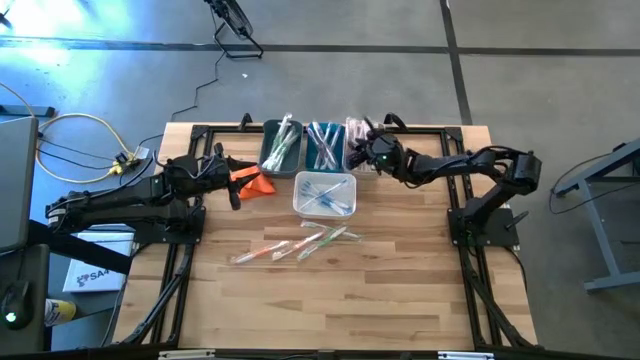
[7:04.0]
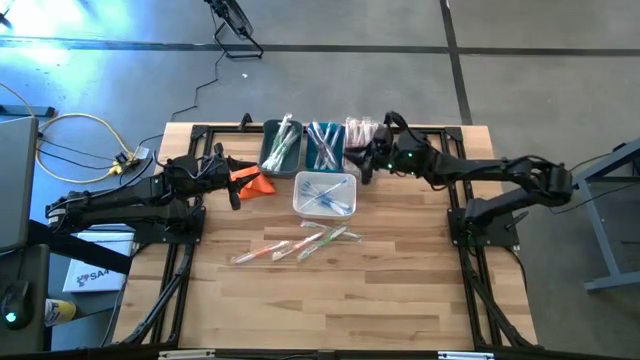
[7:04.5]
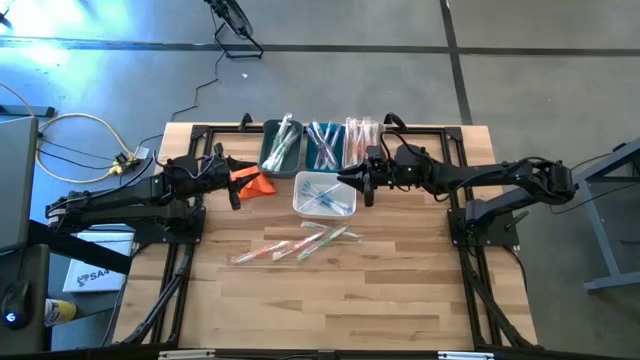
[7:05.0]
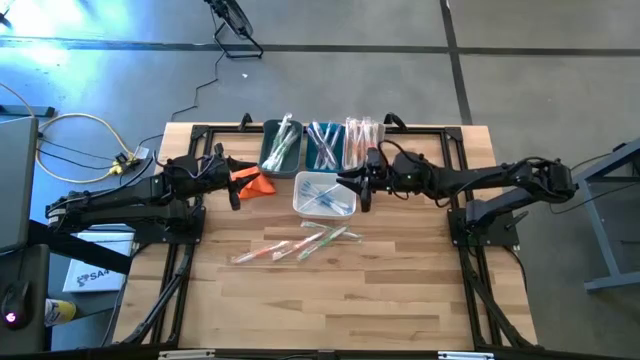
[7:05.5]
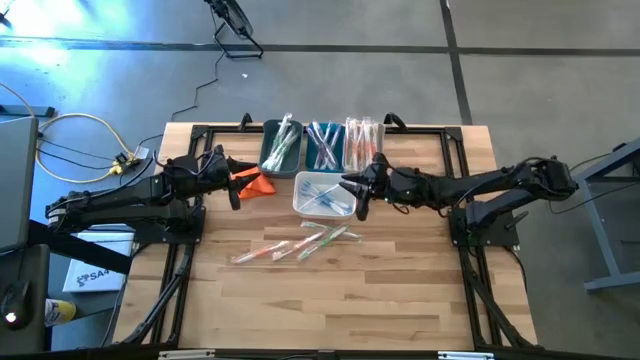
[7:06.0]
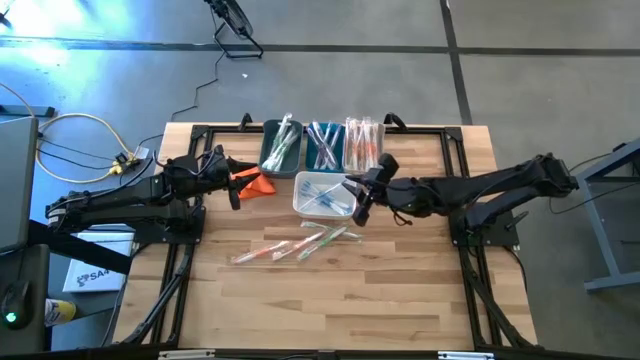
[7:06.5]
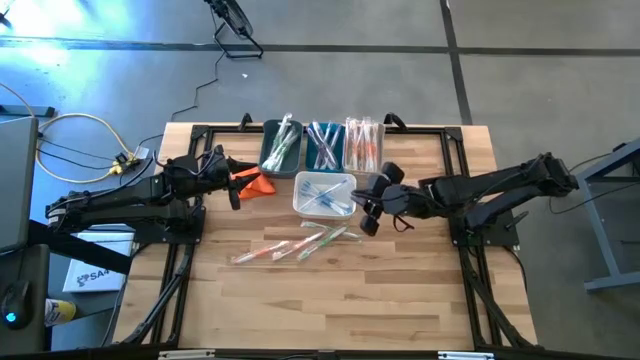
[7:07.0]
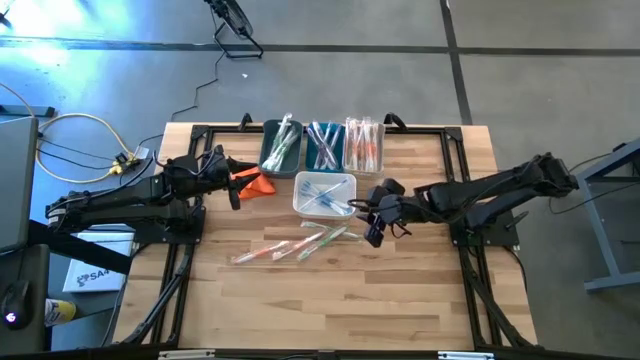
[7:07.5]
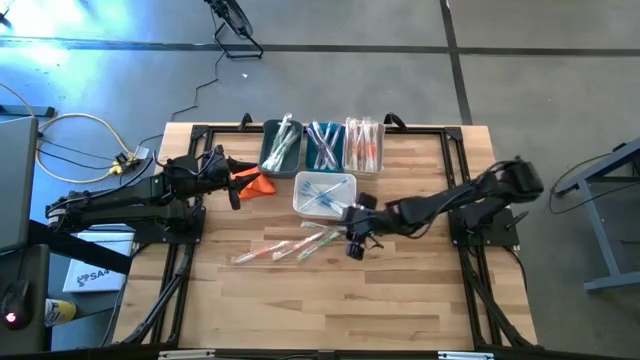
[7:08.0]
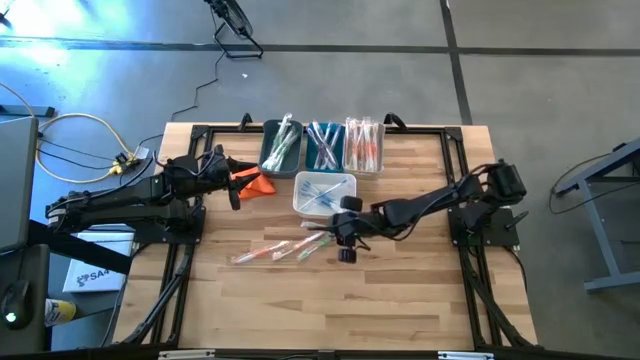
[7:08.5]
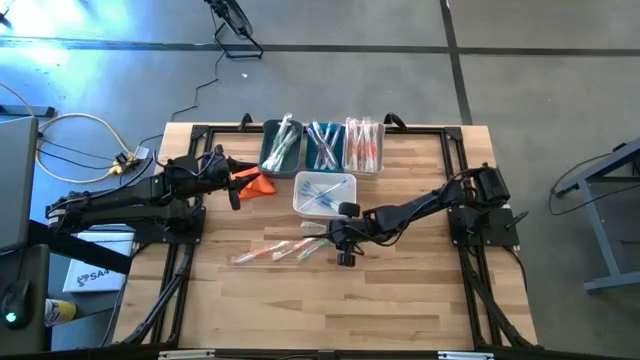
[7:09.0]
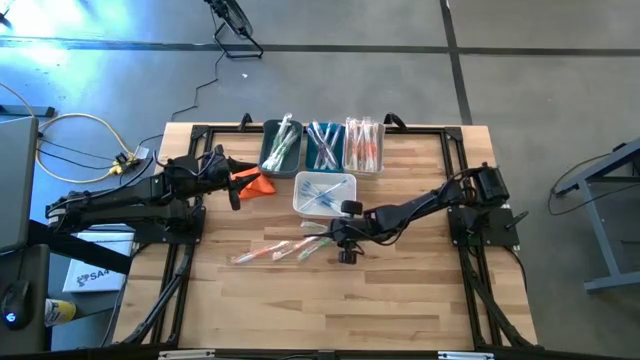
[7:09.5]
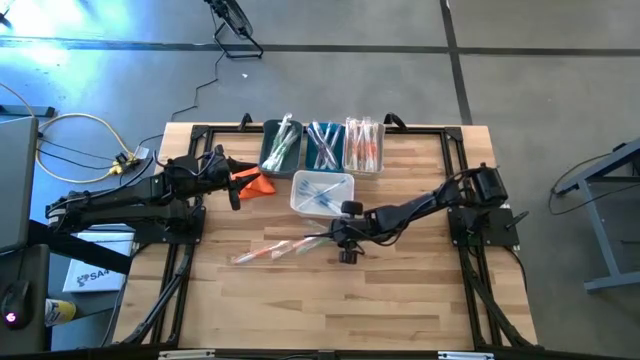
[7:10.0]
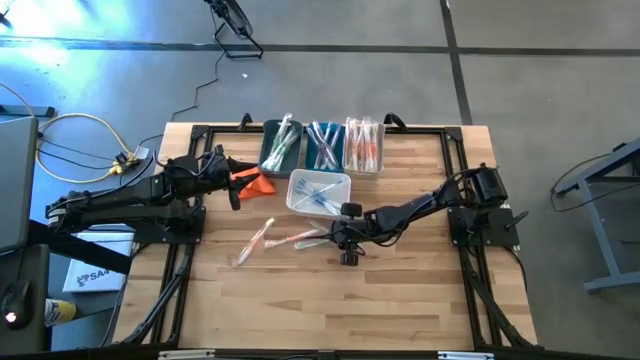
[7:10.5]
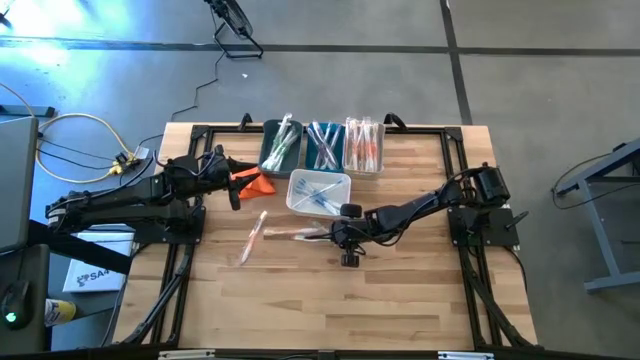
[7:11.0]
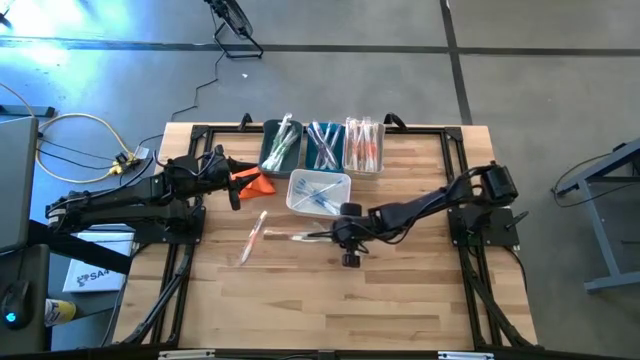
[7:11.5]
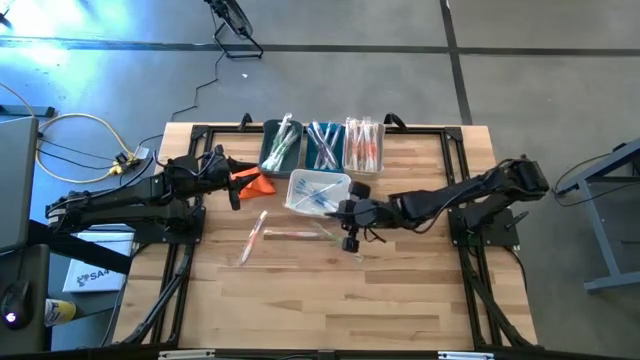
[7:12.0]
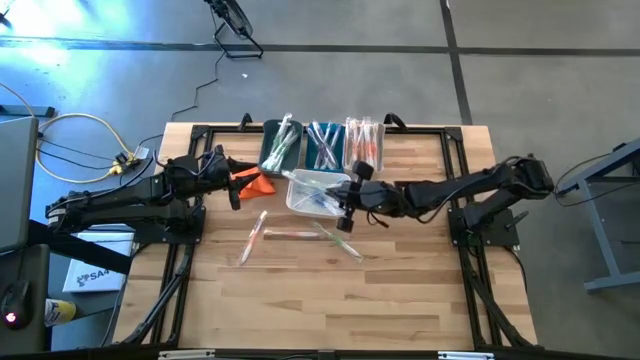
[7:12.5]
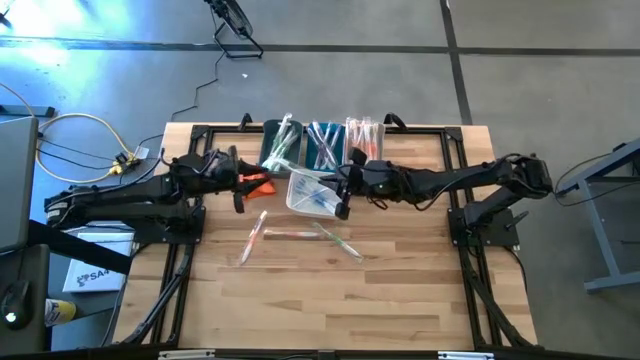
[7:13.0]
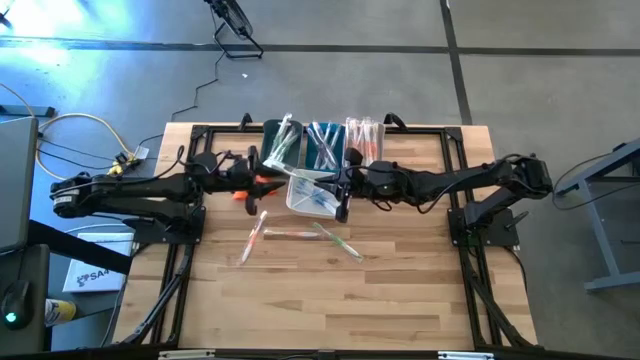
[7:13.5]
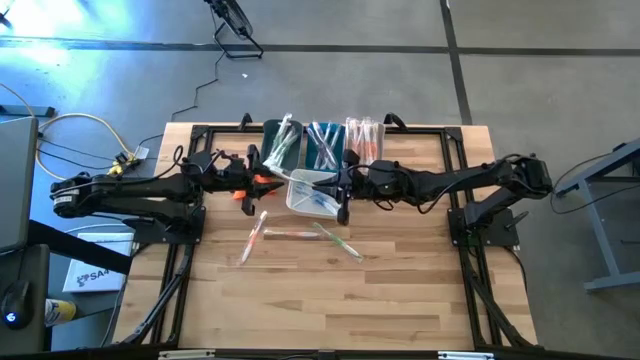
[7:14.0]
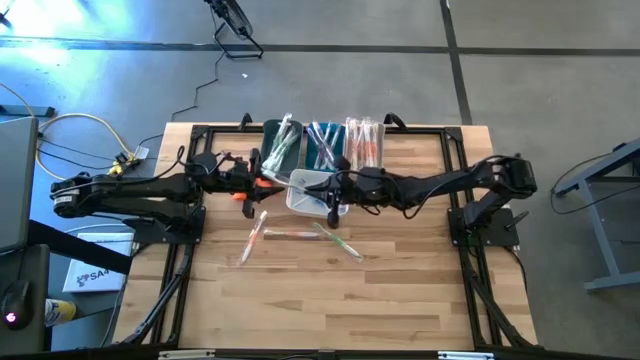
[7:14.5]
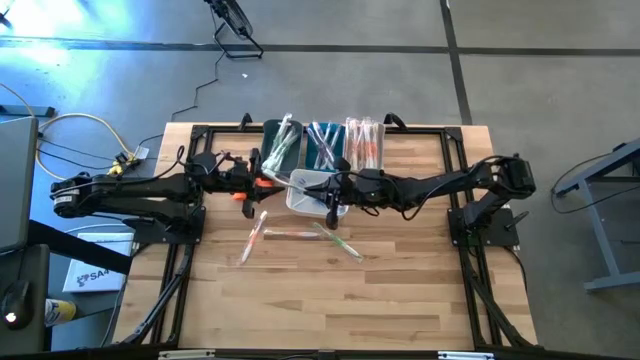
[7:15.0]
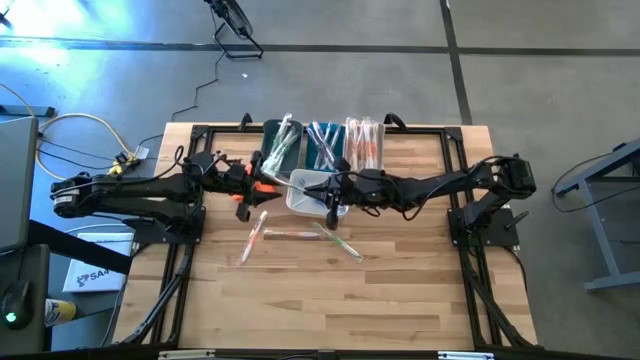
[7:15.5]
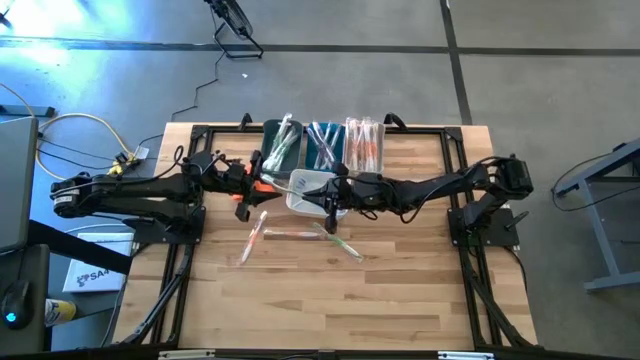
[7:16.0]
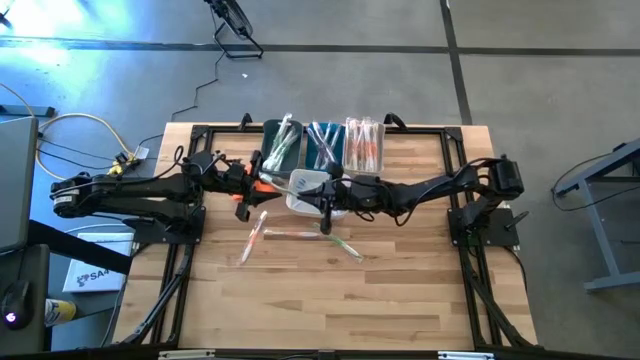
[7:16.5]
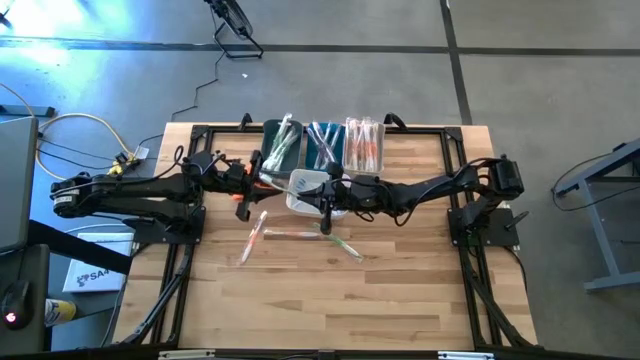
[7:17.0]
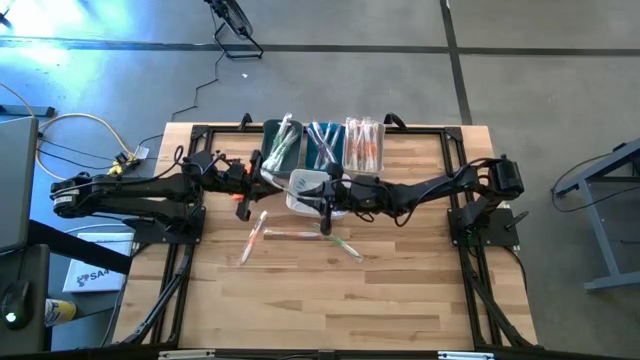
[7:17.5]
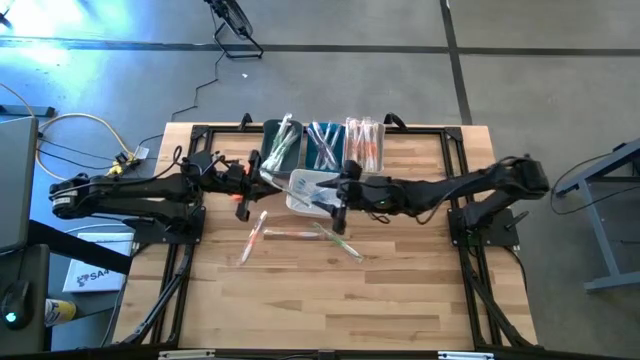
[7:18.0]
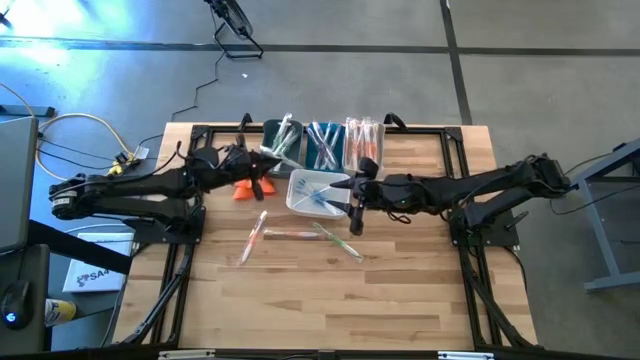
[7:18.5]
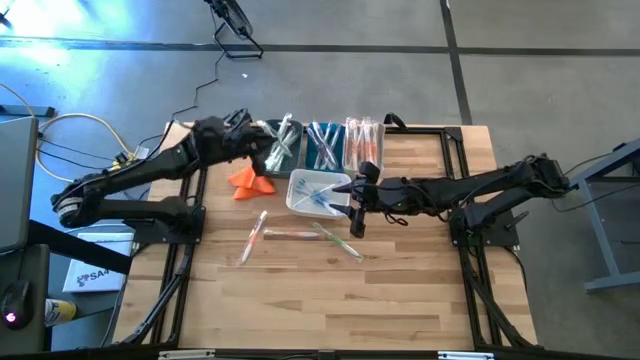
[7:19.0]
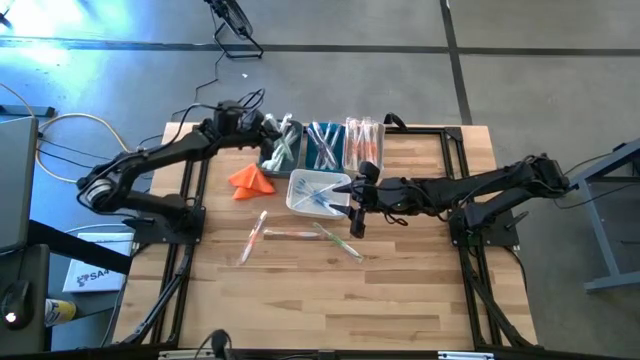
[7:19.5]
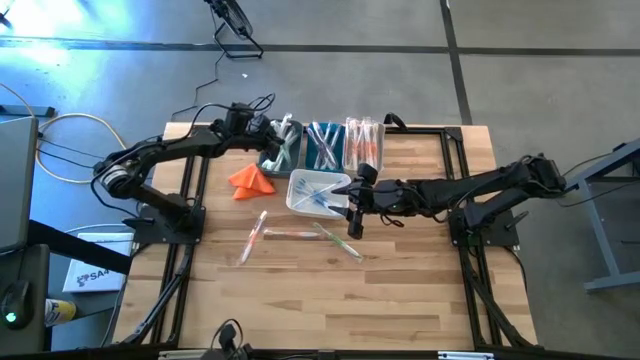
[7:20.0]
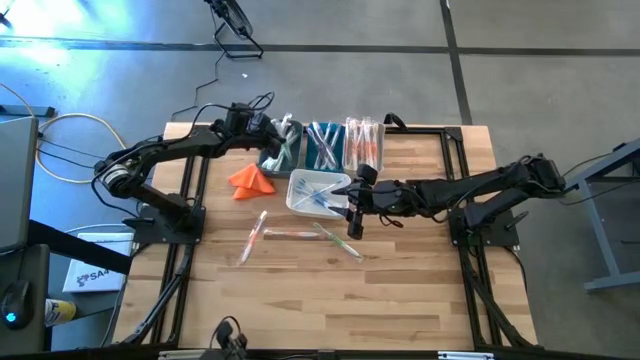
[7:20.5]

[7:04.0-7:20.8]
Task: Pick & Place Toothbrushes
Put the green toothbrush into the dark blue bin

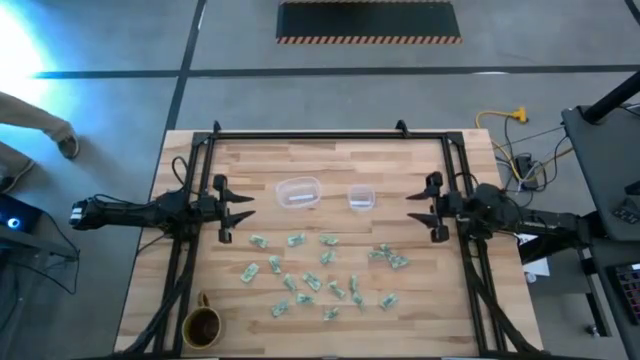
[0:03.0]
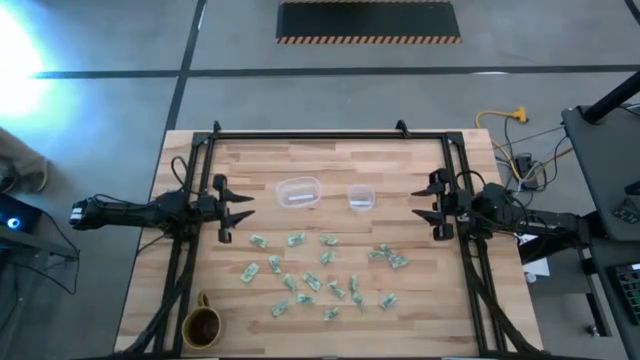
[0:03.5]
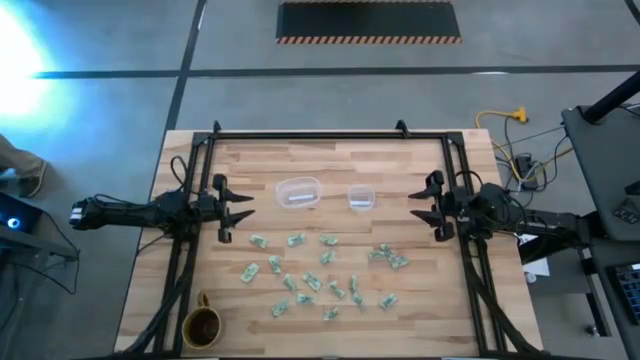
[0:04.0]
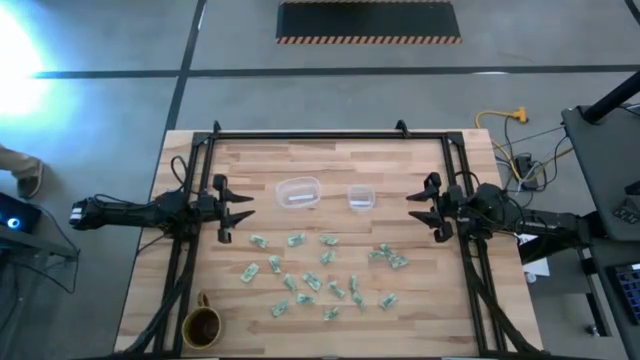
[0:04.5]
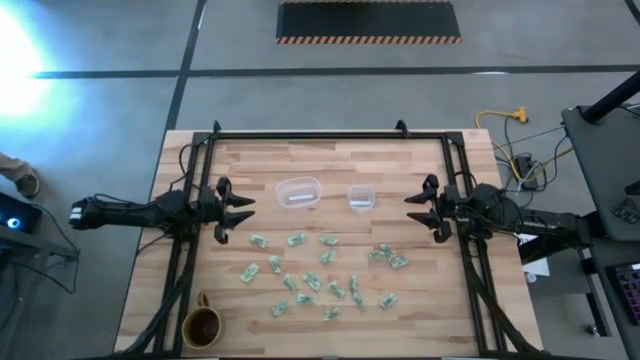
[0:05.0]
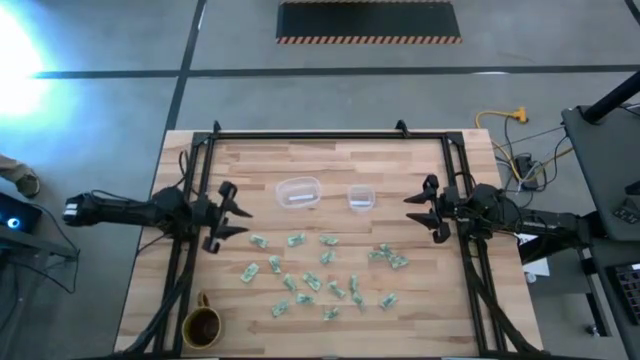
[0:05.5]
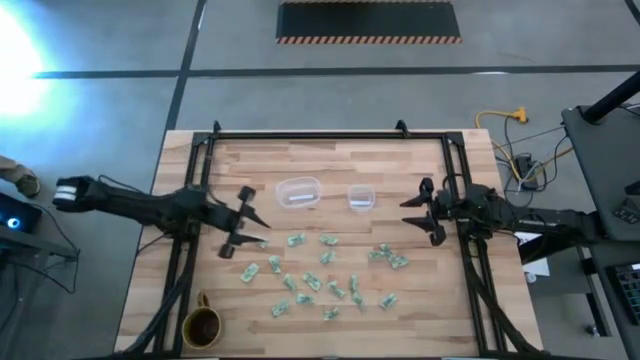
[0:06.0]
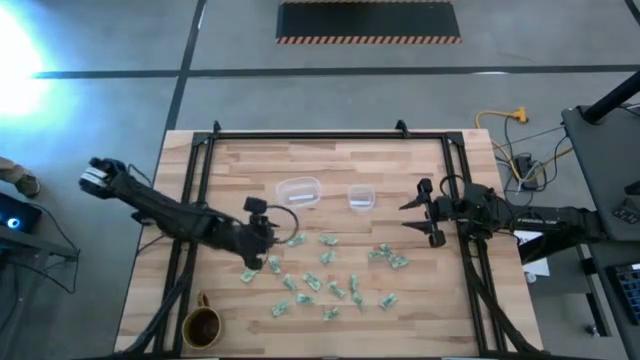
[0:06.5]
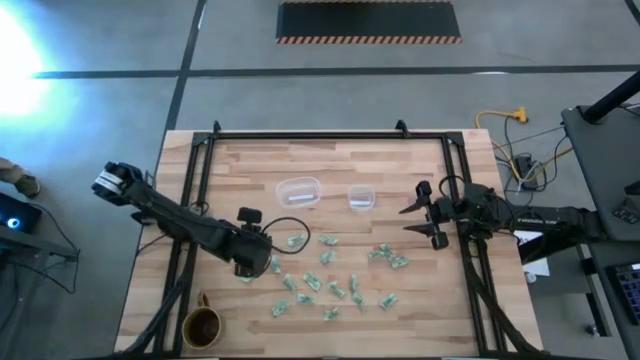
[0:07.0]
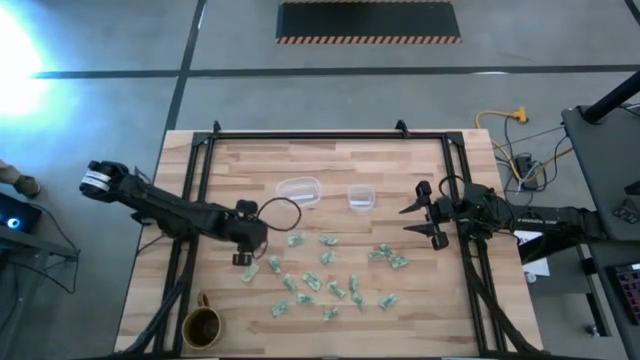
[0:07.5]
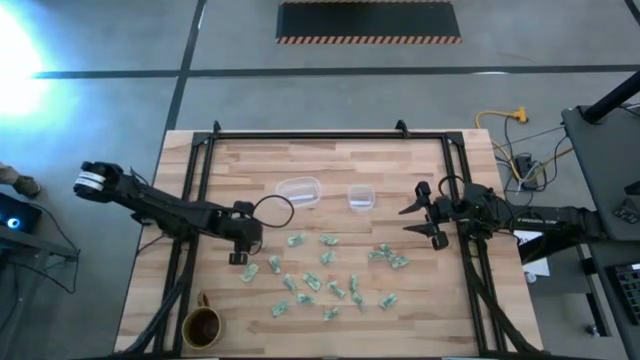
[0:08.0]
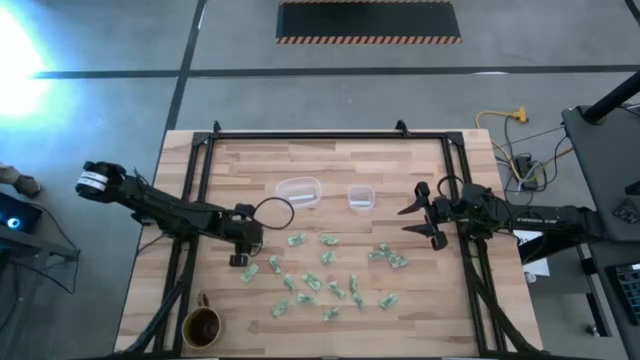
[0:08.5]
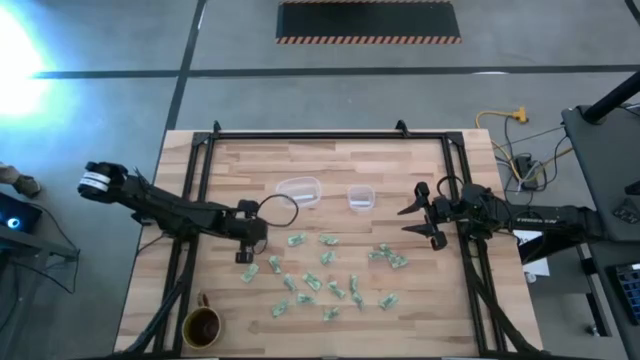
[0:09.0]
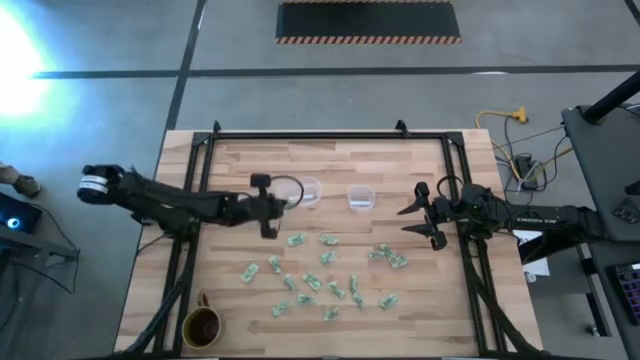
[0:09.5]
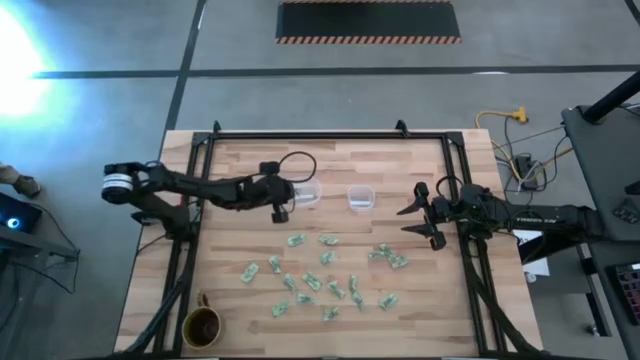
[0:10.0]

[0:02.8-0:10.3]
Task: Pick and place Stevia / Truvia into bins
Put the stevia packet into the transparent oval container
